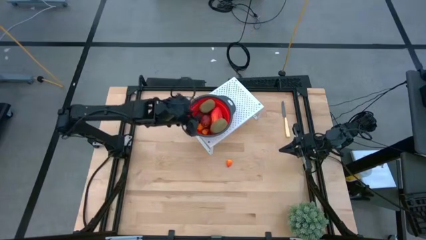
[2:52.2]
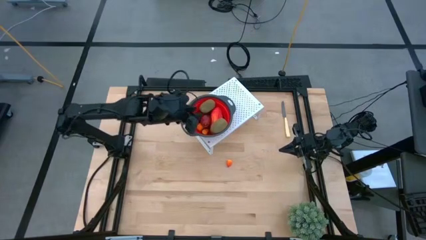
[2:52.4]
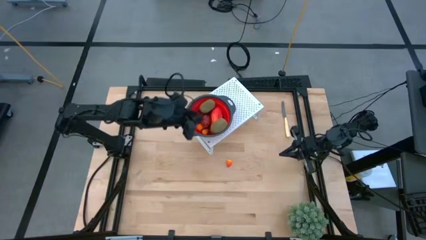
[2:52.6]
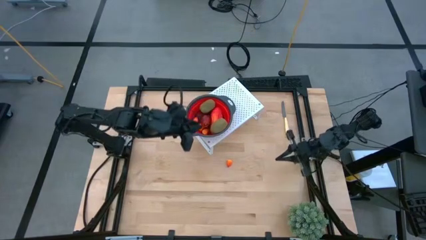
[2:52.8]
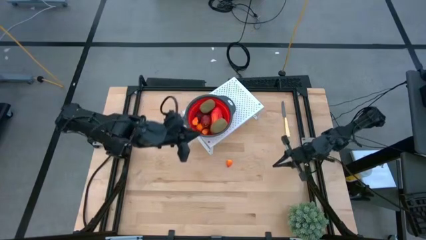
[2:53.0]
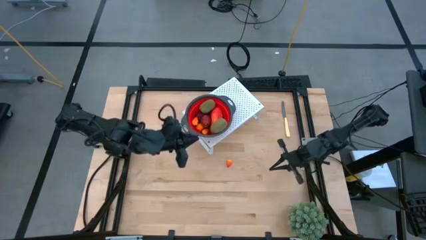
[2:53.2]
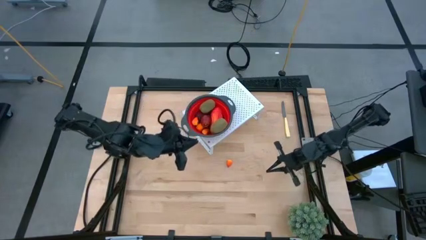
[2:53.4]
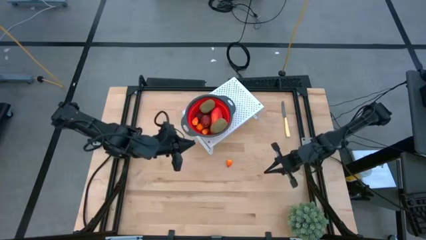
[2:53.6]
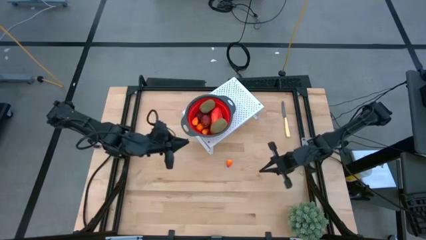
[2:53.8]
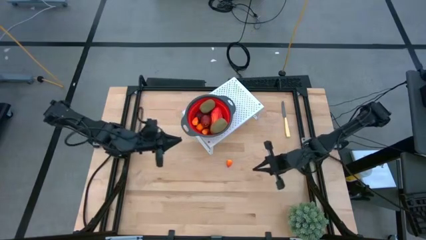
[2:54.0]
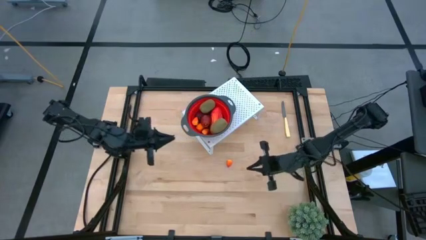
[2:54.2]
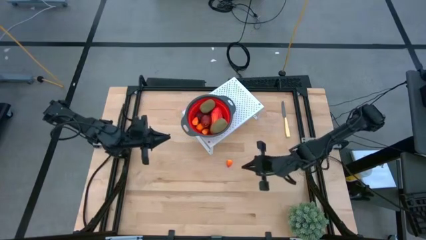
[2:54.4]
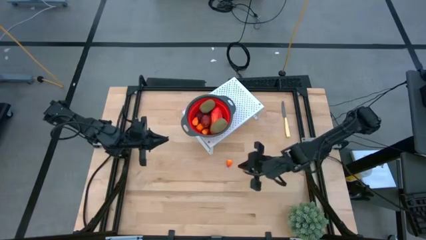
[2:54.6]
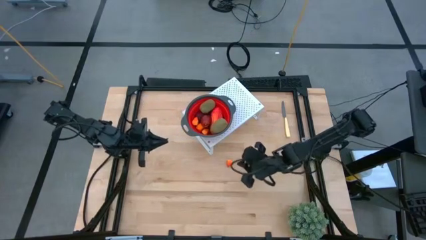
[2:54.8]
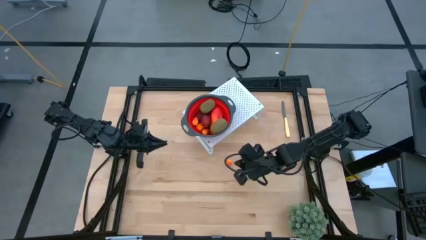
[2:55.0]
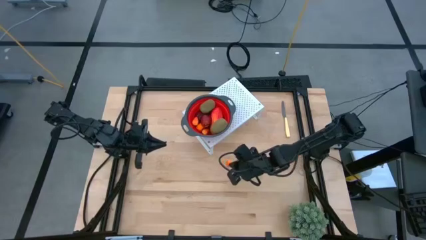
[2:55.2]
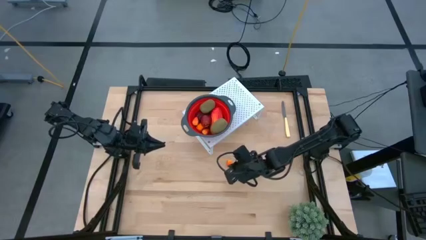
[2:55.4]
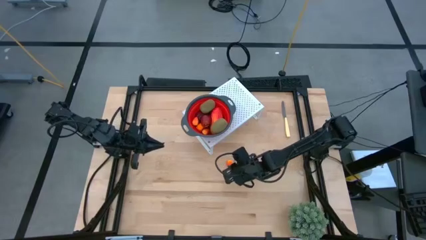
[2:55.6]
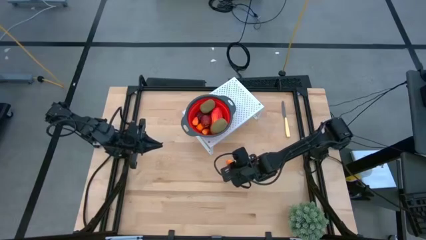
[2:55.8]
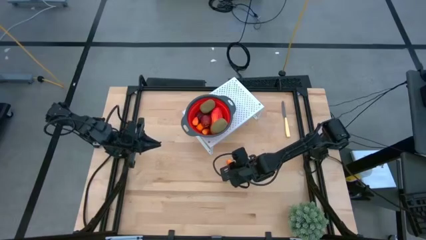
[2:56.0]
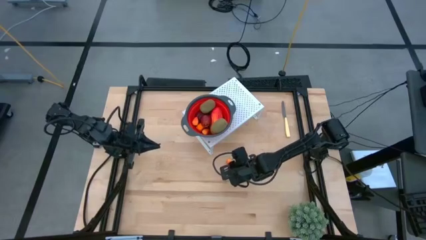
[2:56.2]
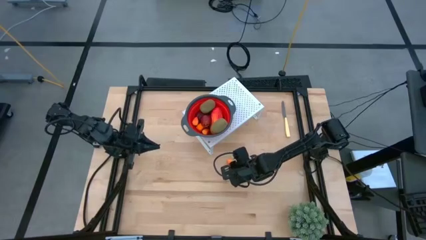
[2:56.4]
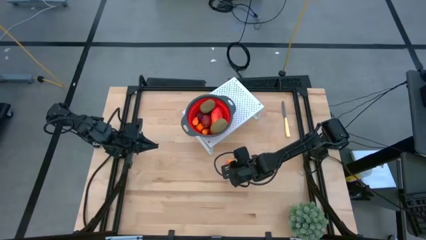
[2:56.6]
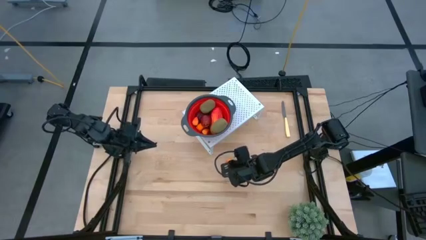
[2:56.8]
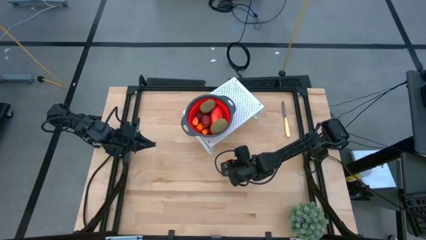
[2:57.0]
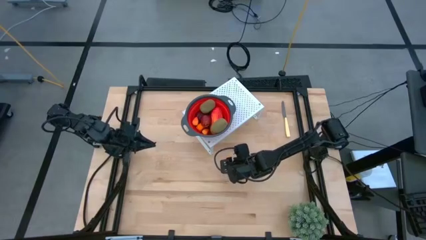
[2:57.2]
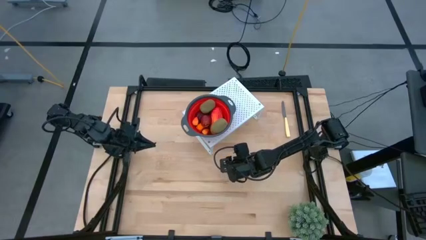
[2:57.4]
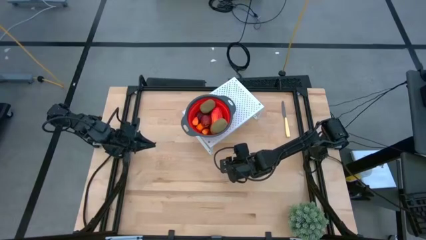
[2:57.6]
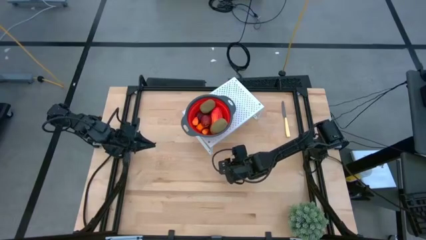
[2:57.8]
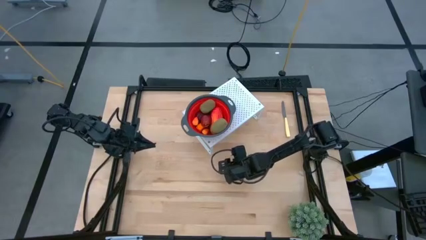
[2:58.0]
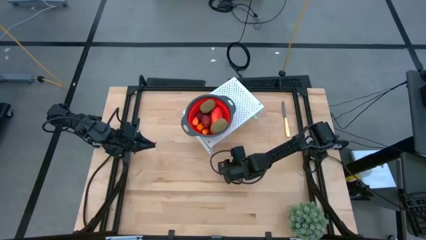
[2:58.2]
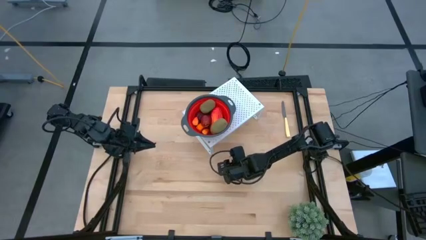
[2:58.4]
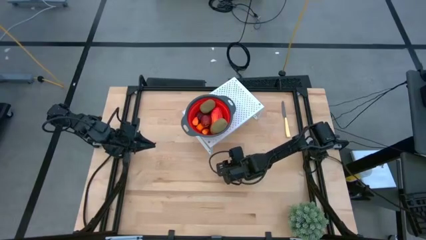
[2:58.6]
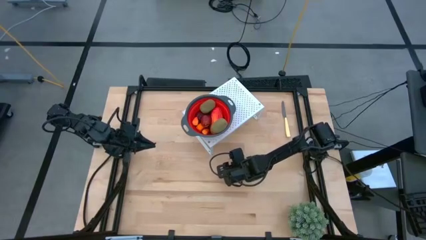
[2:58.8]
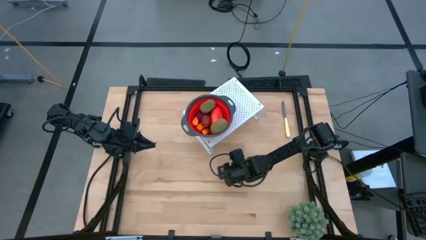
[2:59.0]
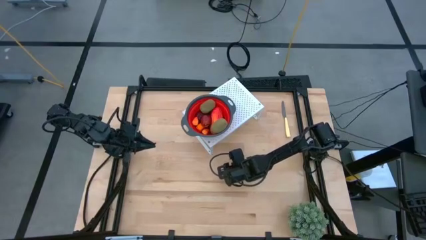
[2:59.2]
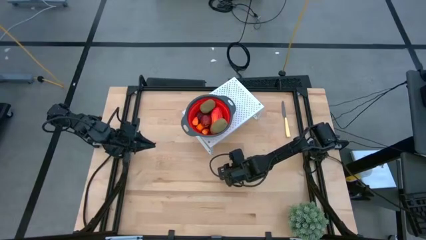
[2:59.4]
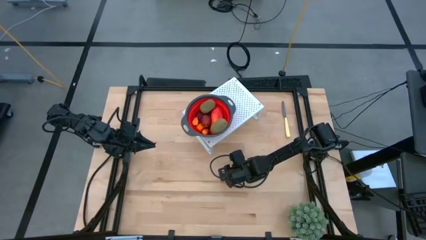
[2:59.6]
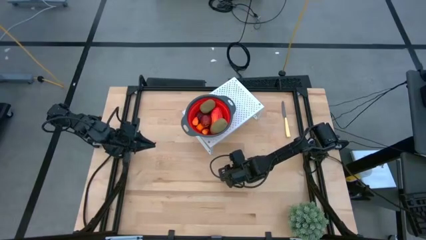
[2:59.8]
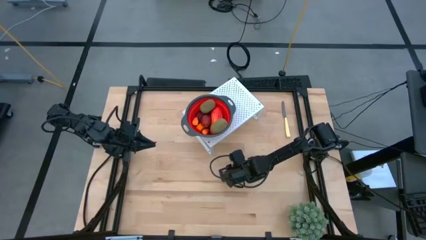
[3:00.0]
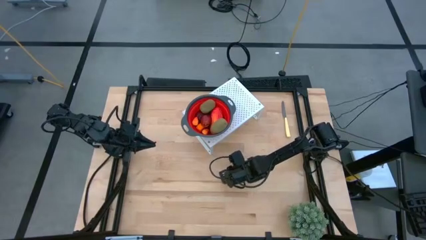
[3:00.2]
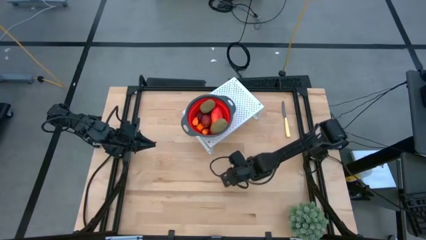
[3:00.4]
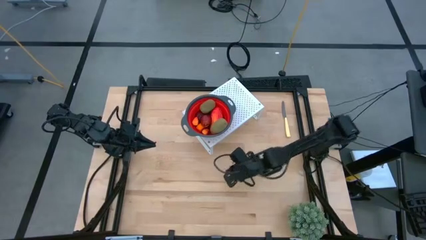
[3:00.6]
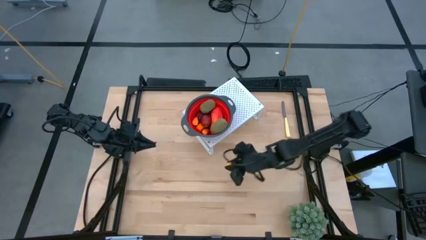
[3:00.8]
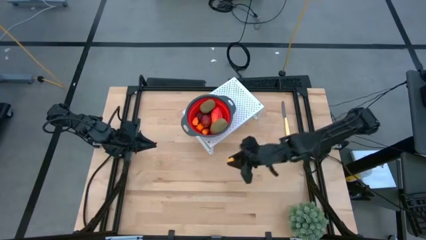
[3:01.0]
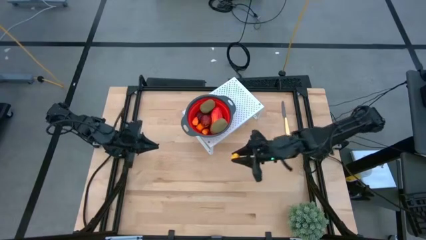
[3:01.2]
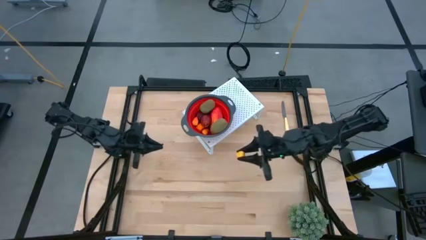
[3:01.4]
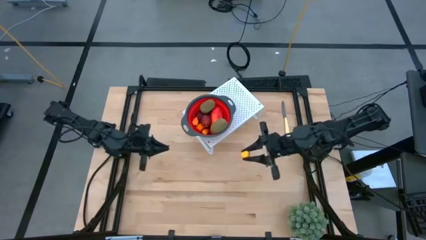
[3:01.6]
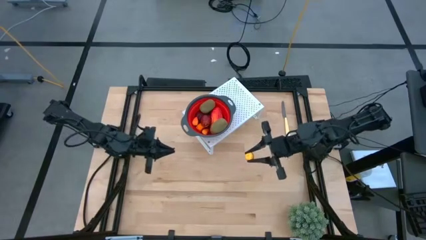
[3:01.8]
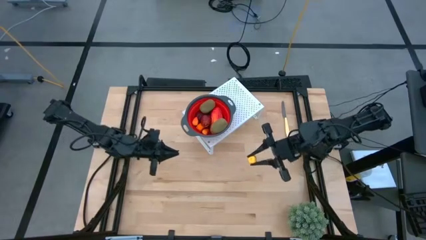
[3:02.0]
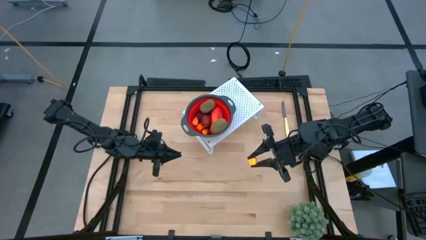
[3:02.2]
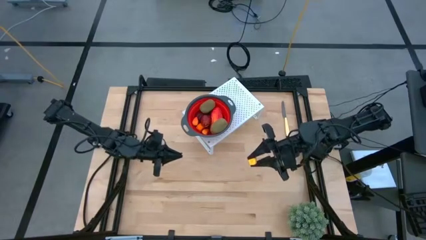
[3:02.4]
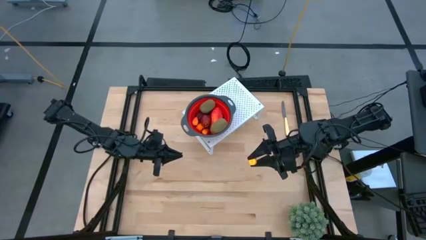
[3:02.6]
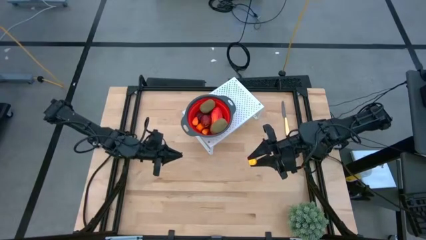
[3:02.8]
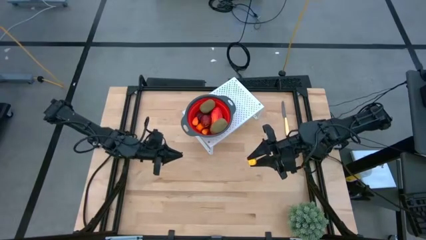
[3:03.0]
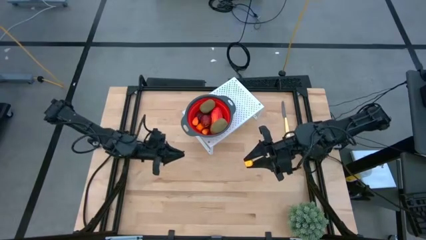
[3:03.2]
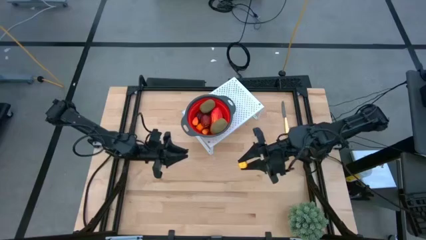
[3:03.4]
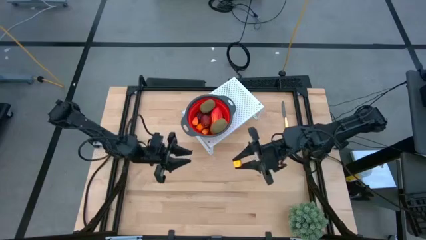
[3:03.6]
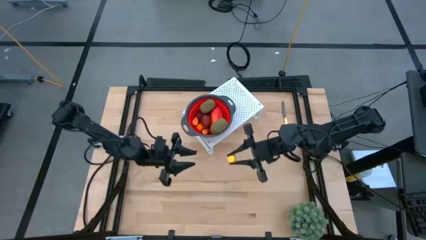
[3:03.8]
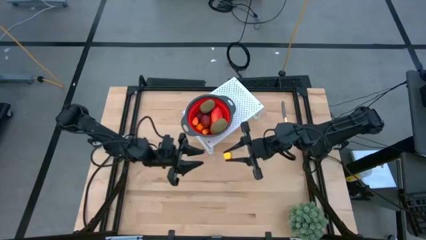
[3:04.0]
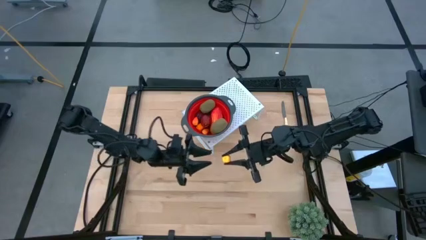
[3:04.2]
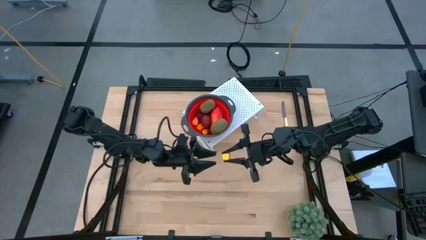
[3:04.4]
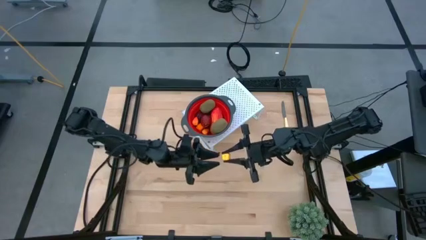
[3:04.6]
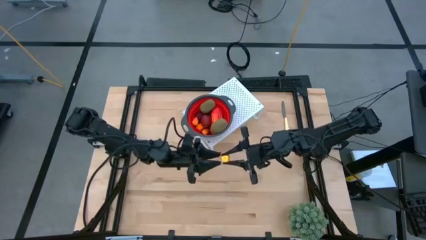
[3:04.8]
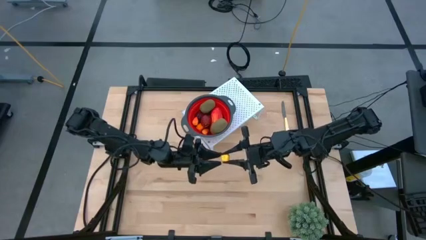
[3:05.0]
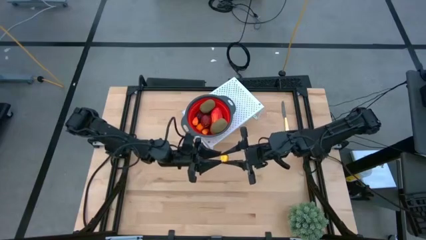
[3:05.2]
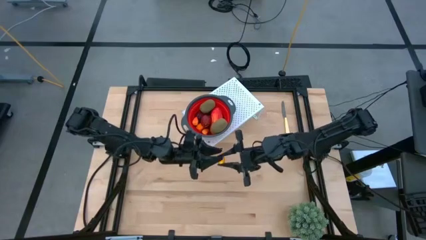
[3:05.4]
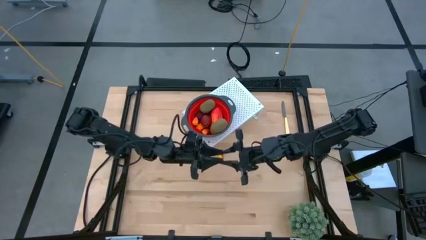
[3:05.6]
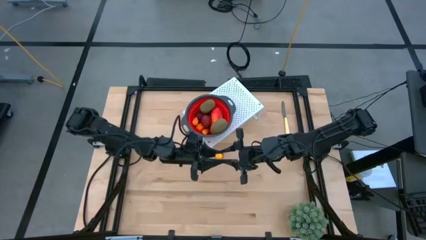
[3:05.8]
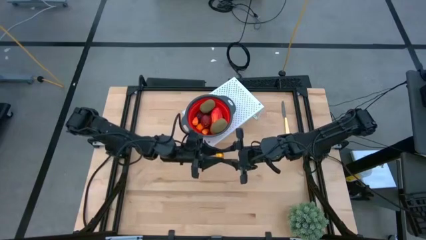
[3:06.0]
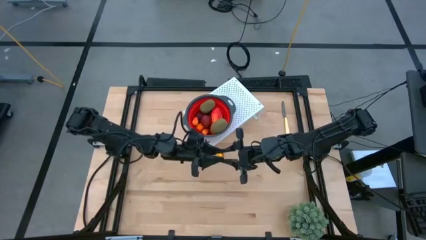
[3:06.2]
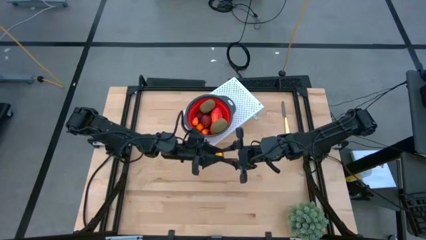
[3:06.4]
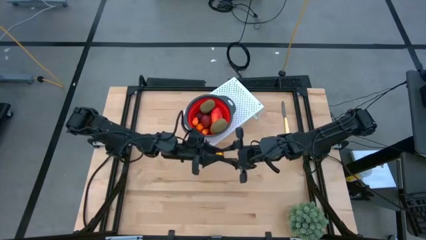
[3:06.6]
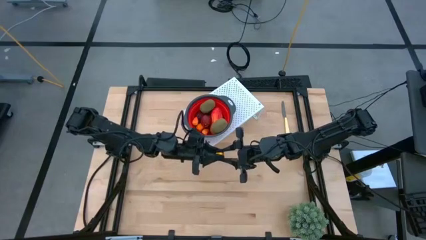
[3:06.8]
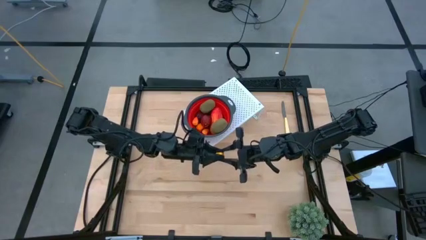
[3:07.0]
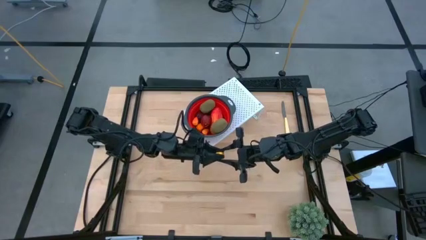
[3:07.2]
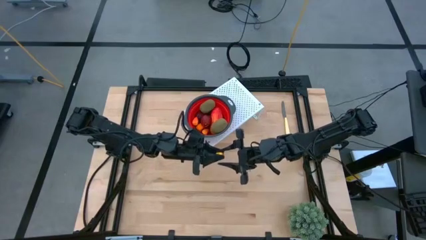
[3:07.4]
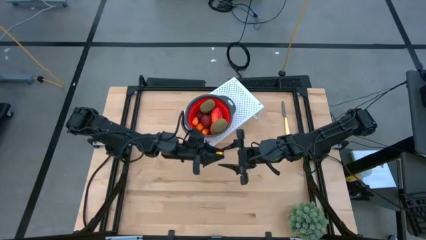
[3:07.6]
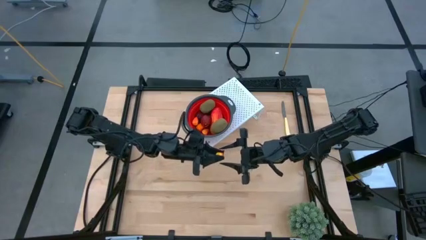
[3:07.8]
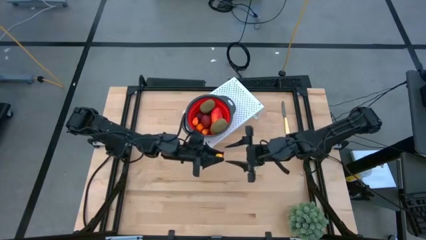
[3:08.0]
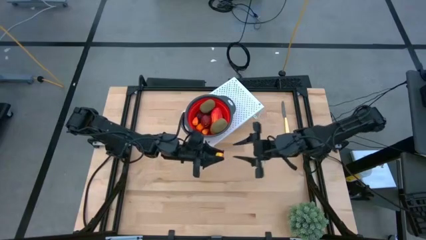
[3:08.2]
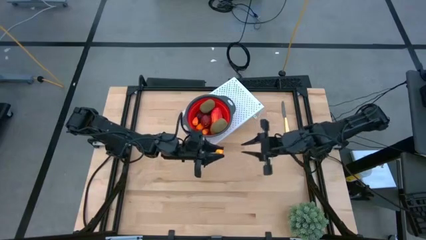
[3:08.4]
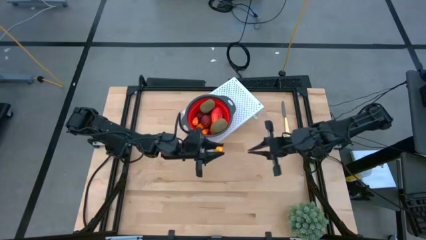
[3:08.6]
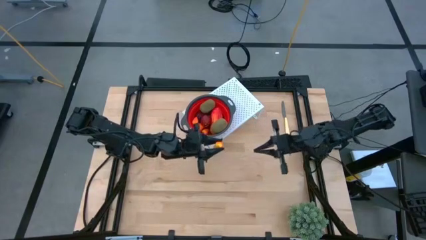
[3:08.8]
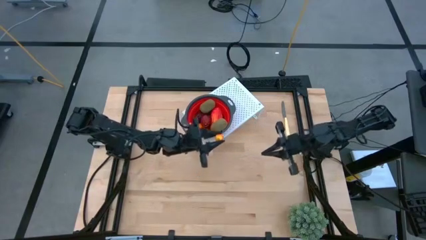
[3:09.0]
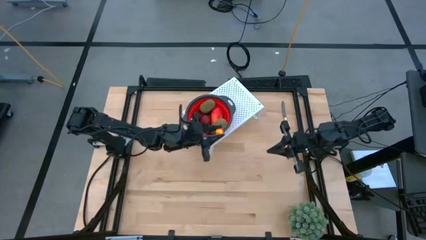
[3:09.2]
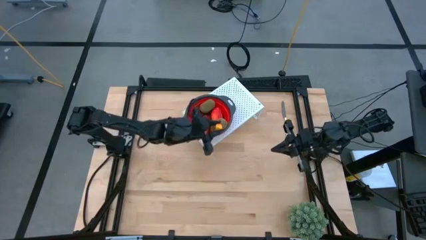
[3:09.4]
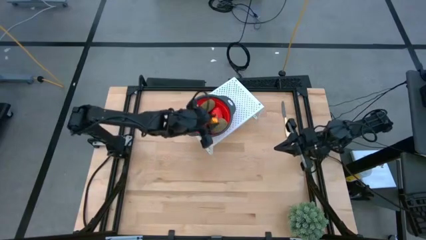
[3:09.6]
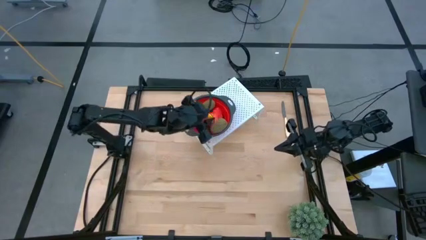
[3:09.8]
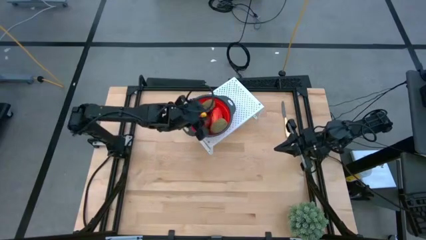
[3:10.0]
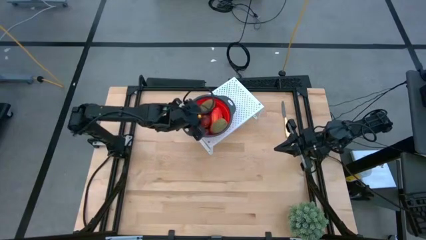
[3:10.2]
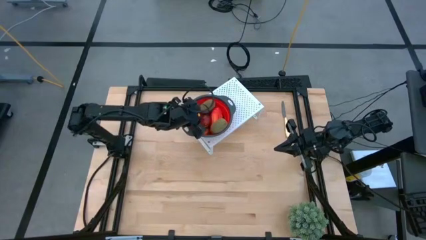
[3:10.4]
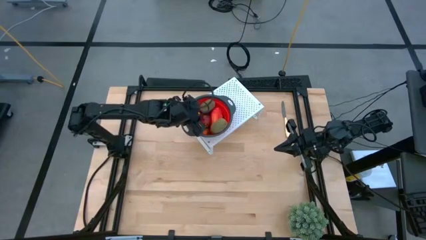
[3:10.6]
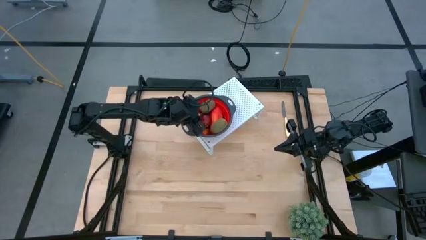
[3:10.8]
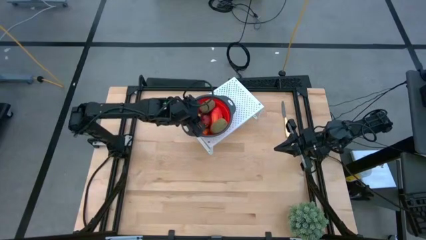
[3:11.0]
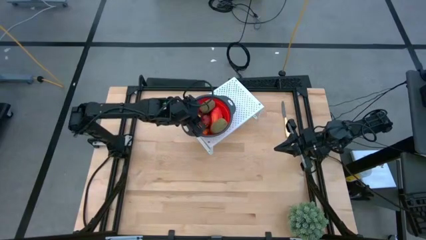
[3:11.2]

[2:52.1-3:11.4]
Task: Pick & Place Fruit
Put the pear into the red strainer bowl on the shelf
